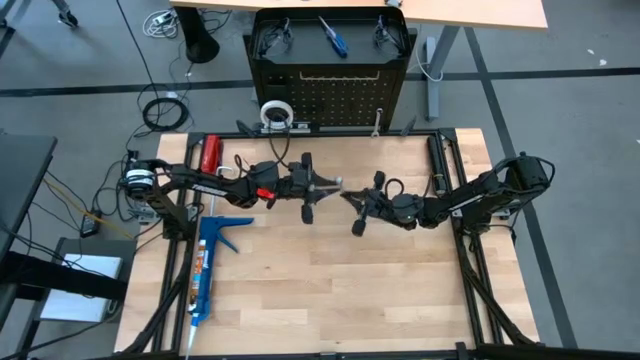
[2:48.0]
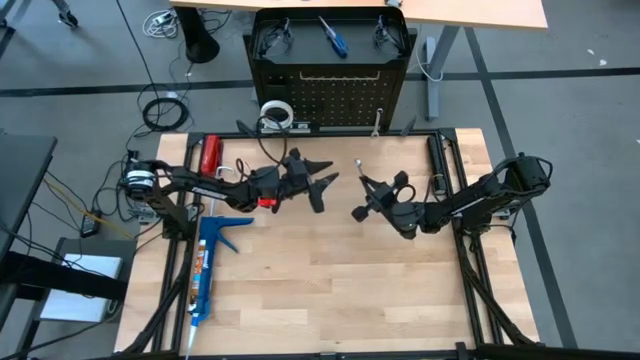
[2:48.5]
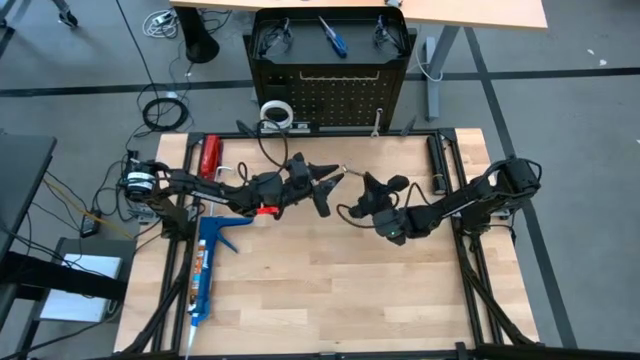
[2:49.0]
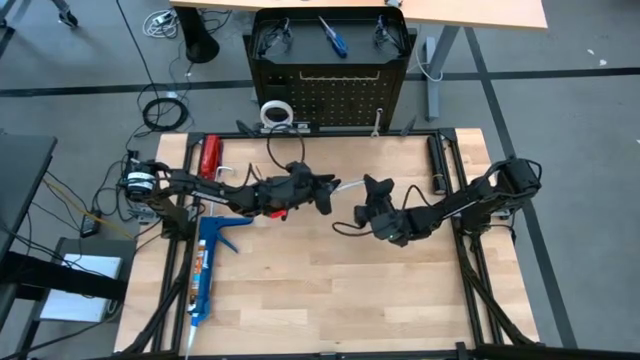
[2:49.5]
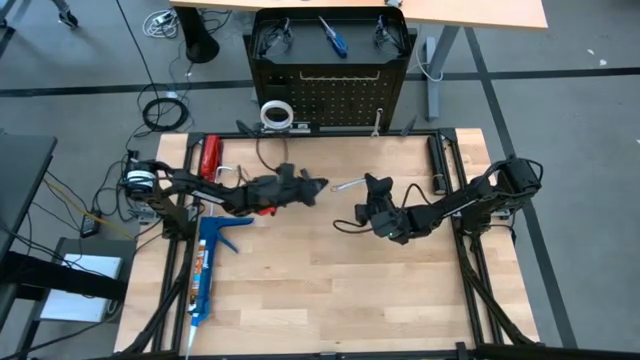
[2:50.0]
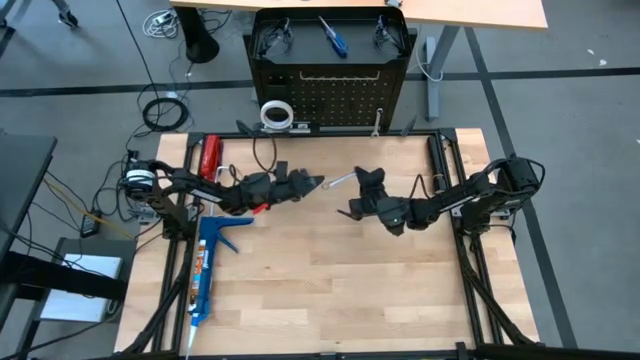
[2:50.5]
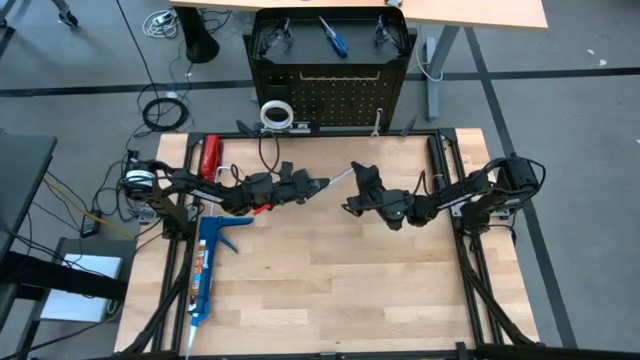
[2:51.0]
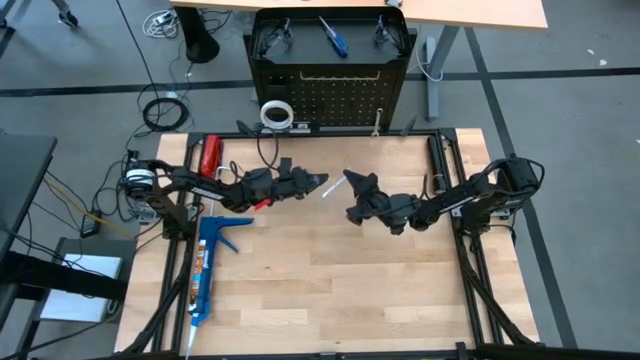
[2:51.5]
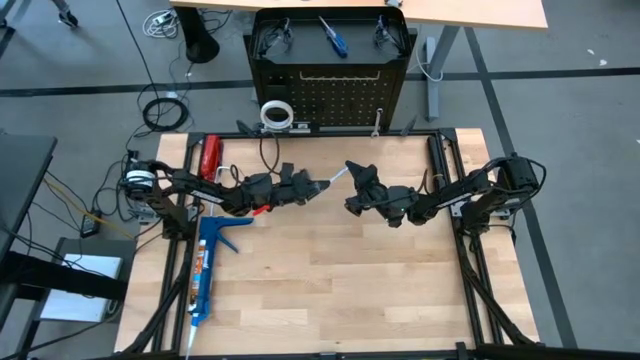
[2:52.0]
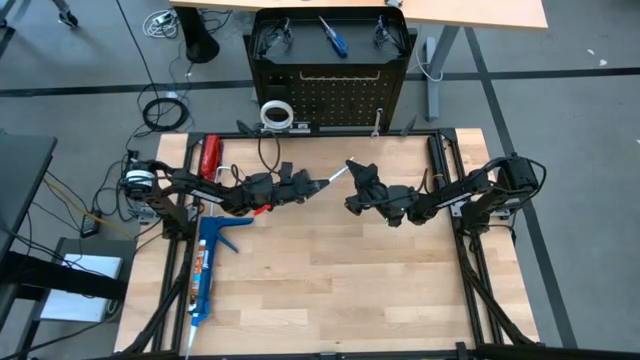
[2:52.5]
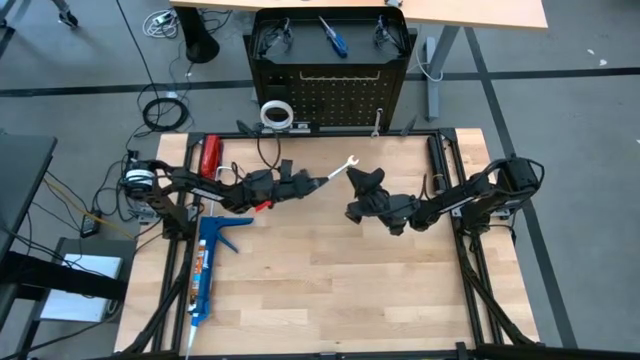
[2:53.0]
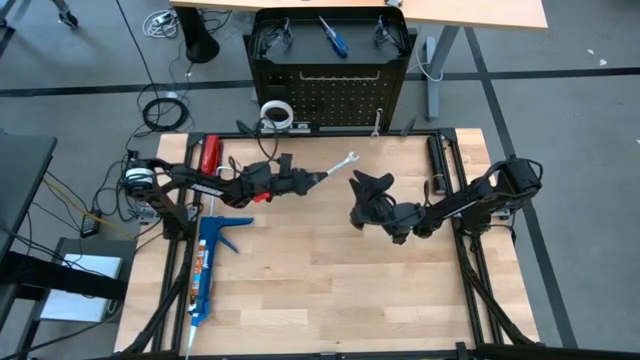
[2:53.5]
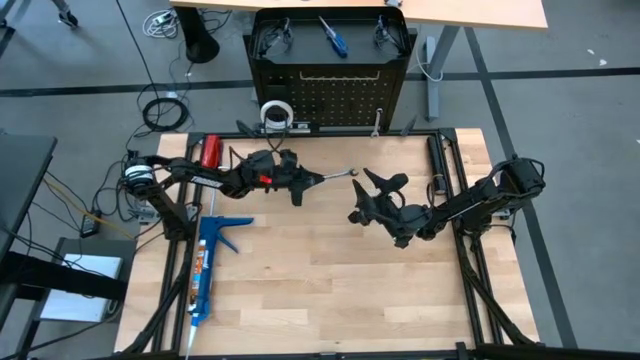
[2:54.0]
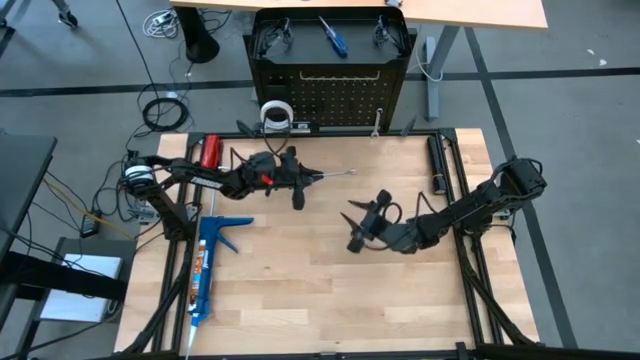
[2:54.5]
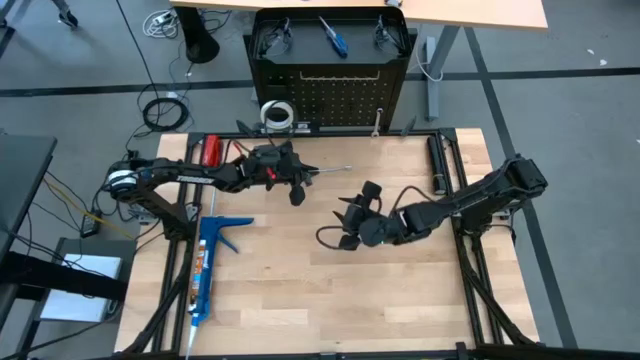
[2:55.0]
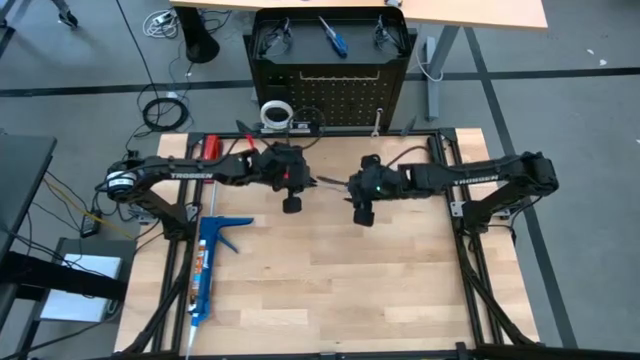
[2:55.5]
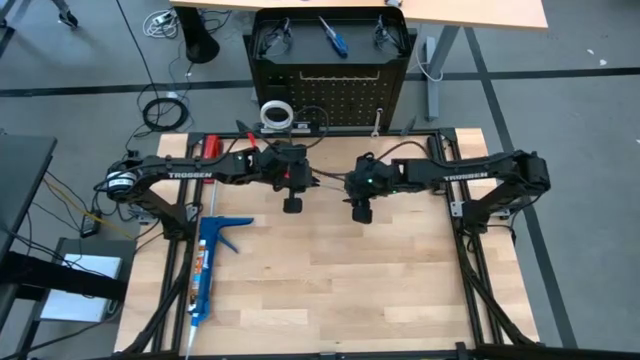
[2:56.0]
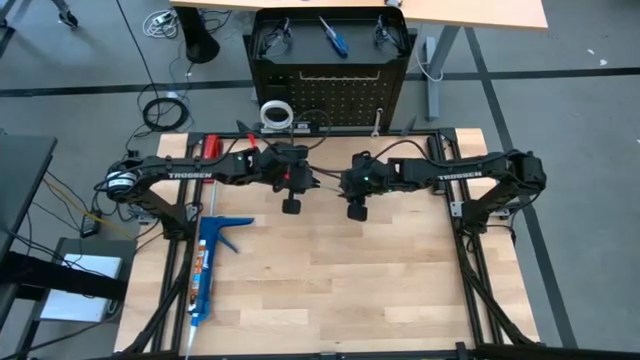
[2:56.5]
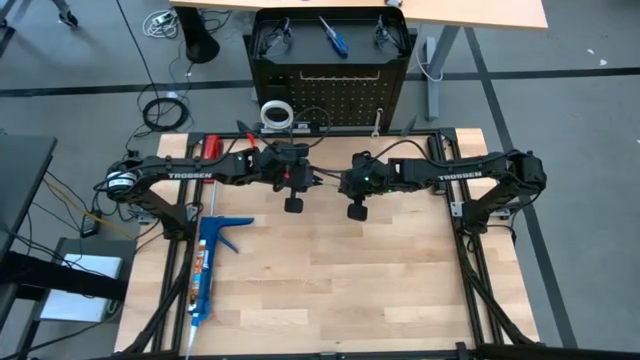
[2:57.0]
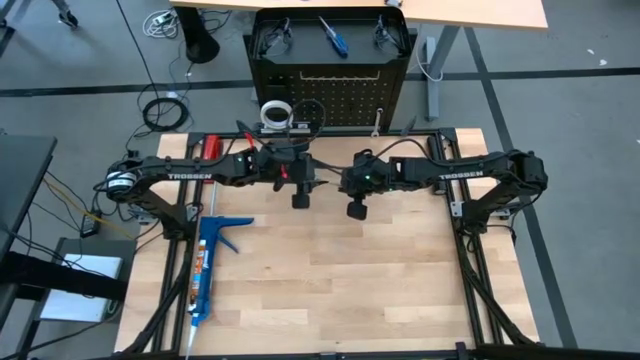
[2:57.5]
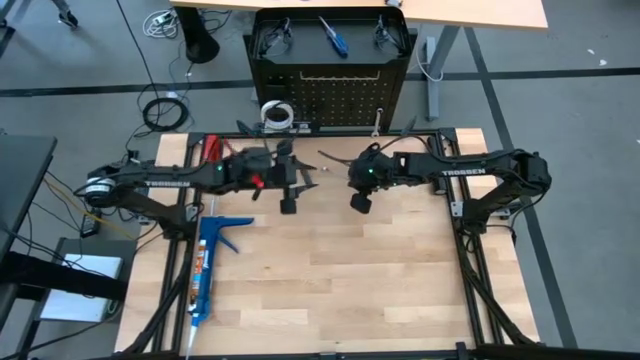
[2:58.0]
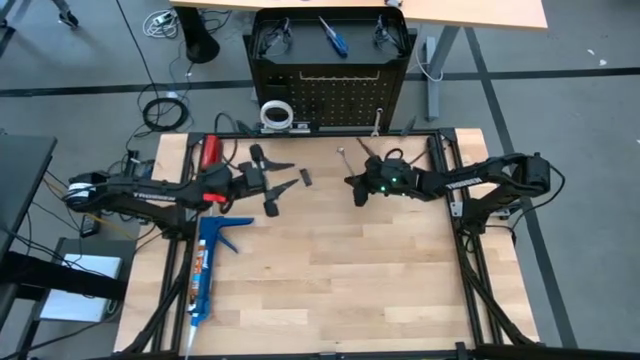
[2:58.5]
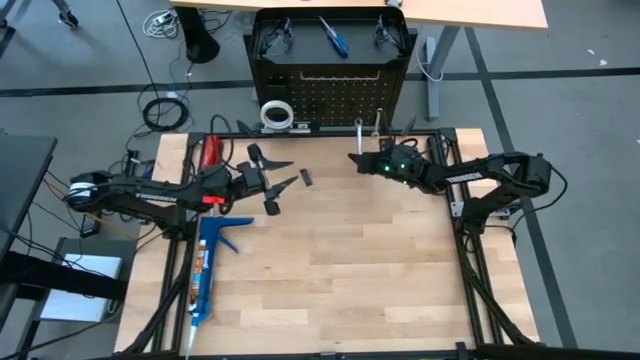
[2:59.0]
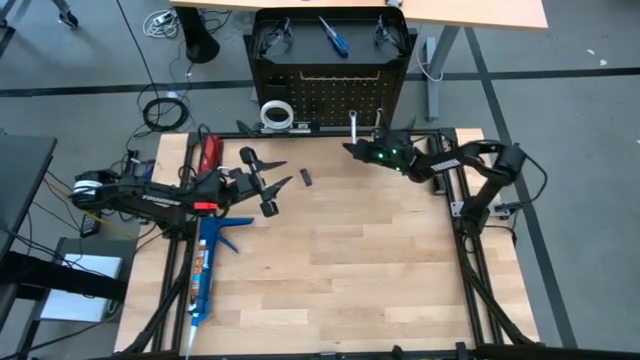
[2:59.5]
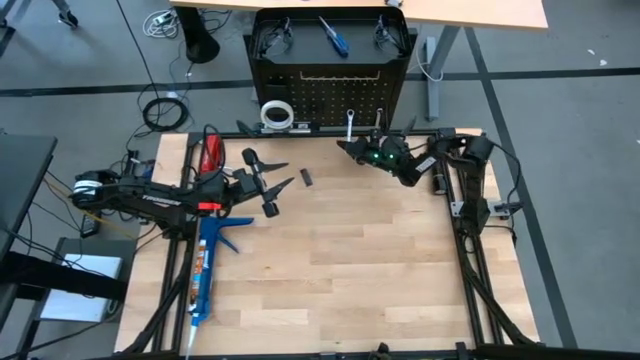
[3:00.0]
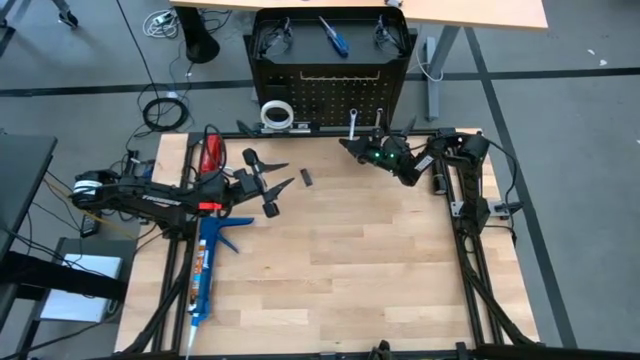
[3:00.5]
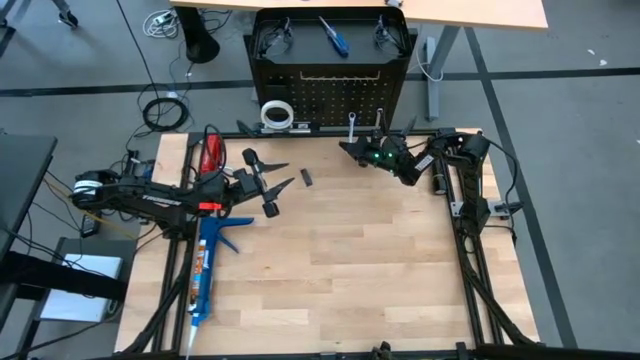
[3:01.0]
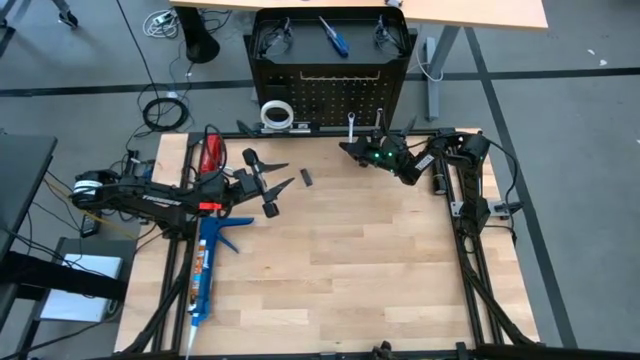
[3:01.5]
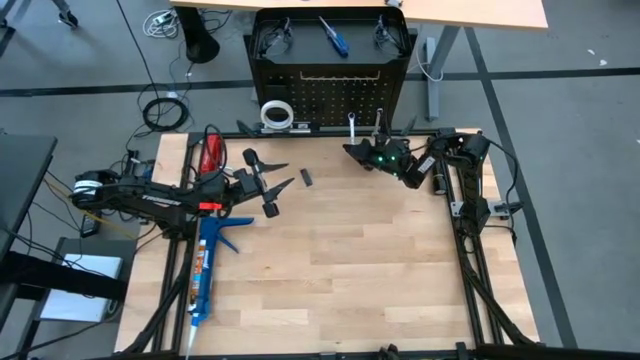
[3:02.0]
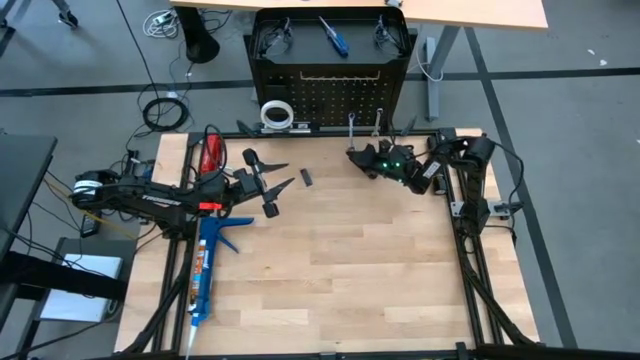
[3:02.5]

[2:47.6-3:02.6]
Task: Hang tools onto peg board
Hang the wrench onto the black pegboard

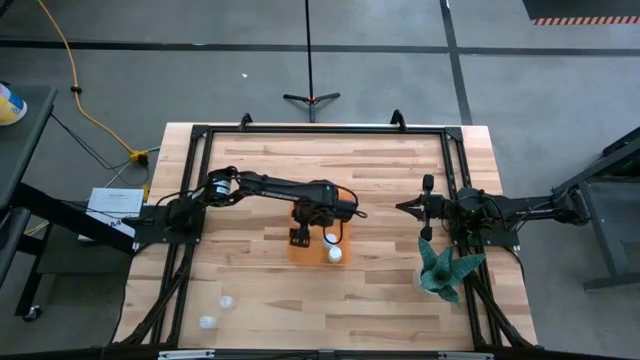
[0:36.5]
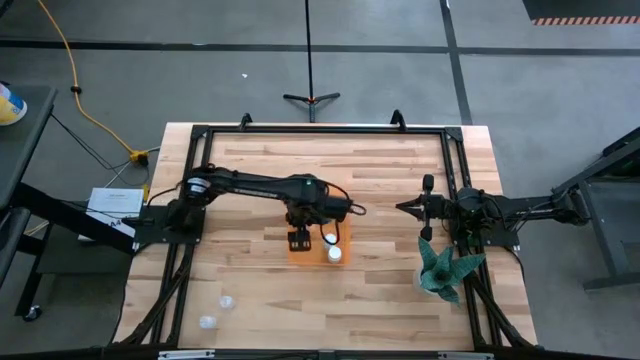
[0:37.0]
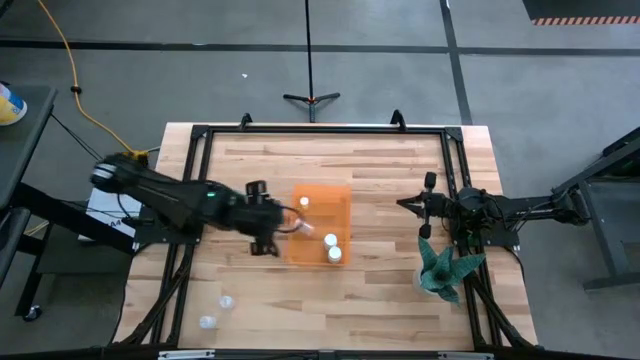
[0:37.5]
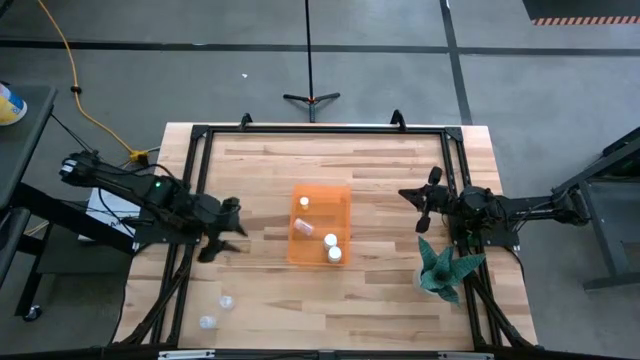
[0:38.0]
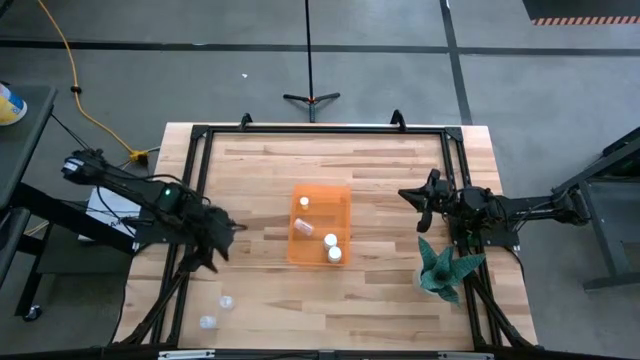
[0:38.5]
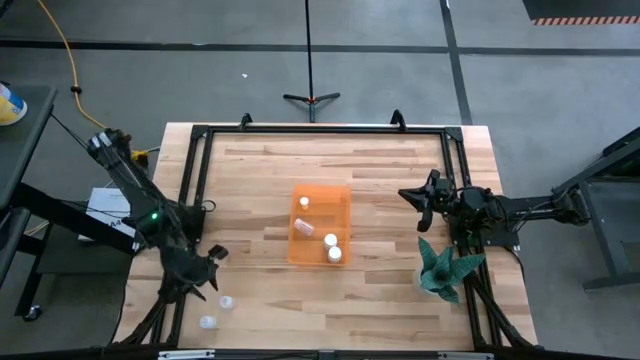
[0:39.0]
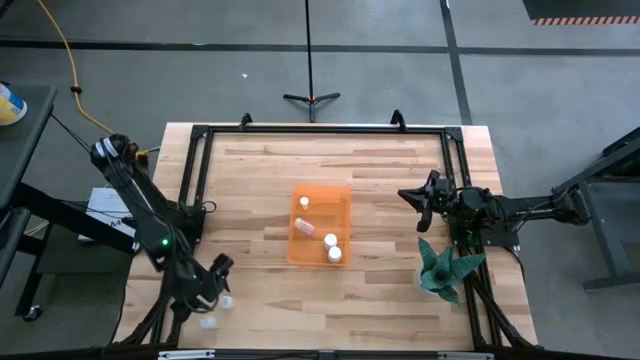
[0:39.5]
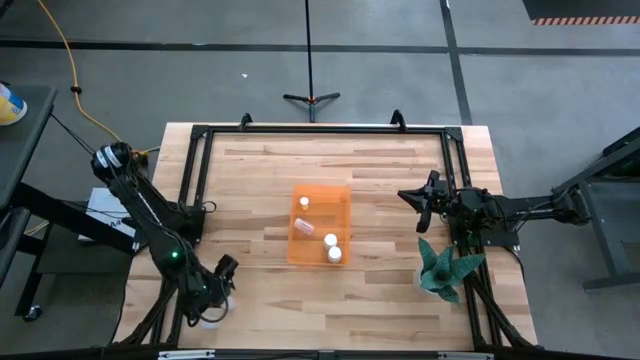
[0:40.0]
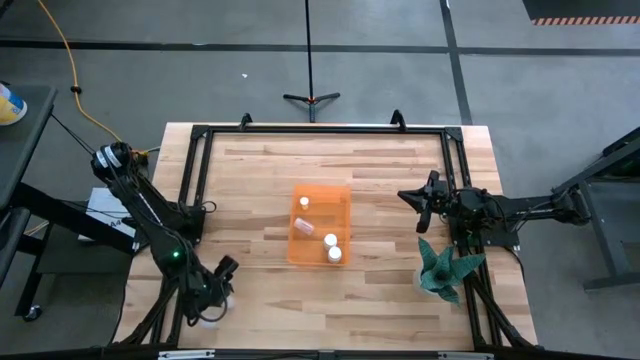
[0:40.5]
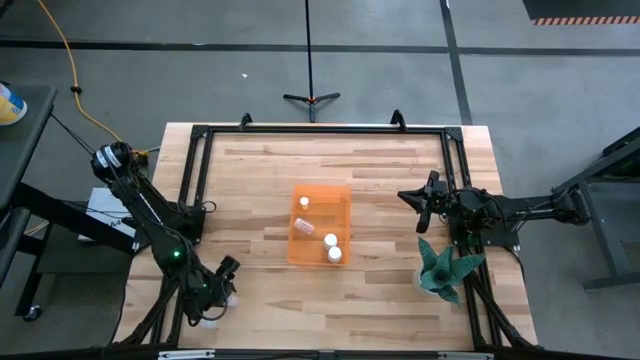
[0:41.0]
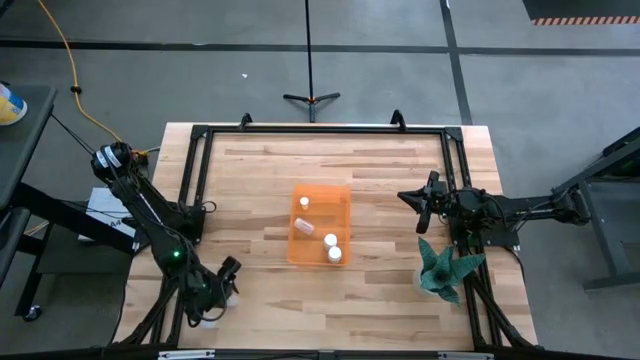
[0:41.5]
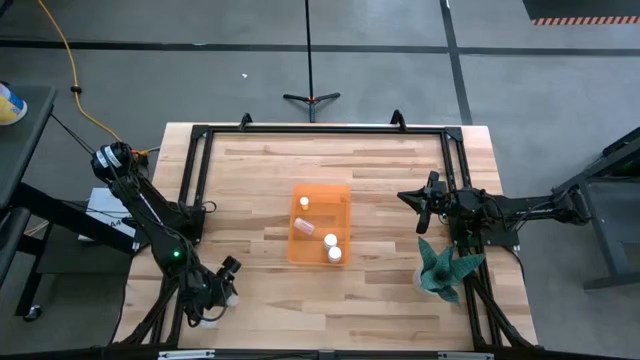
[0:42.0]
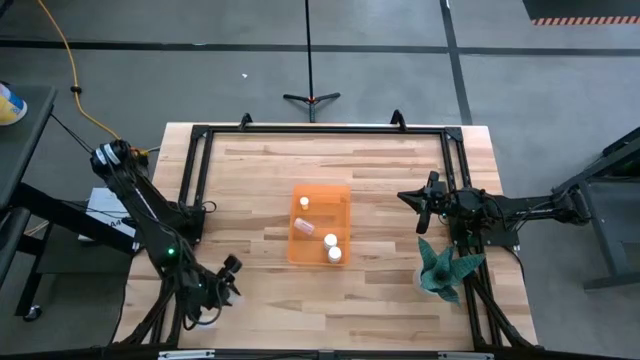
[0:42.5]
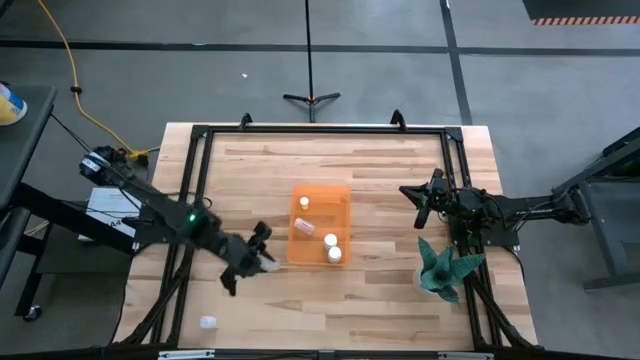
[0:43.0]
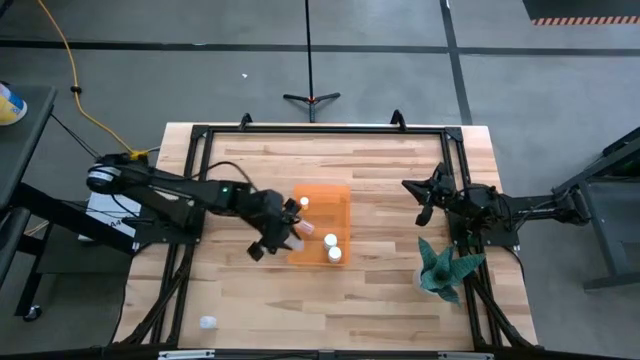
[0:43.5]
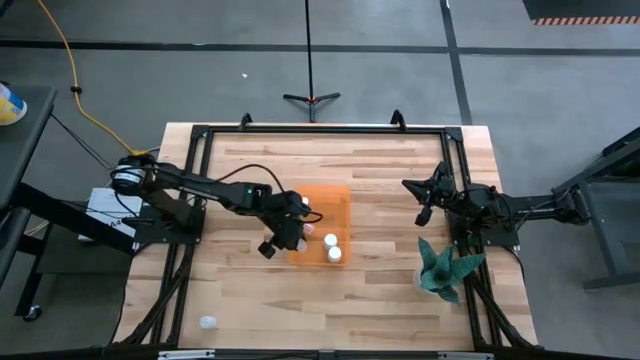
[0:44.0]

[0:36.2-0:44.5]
Task: Pick and place pill bottles into a basket
Put the top transparent pill bottle into the orange bin
